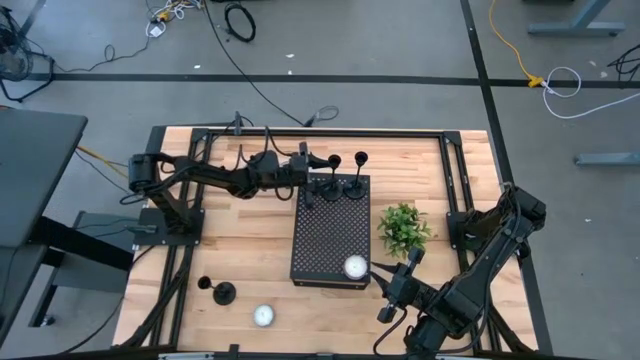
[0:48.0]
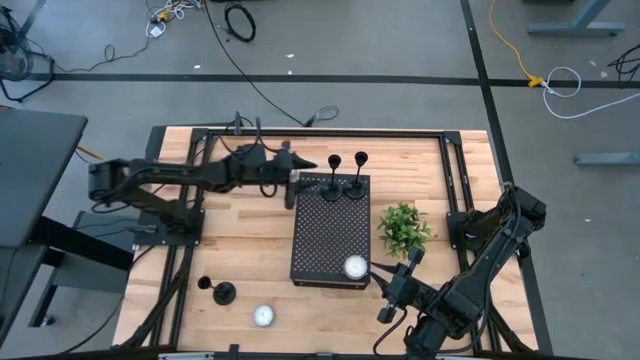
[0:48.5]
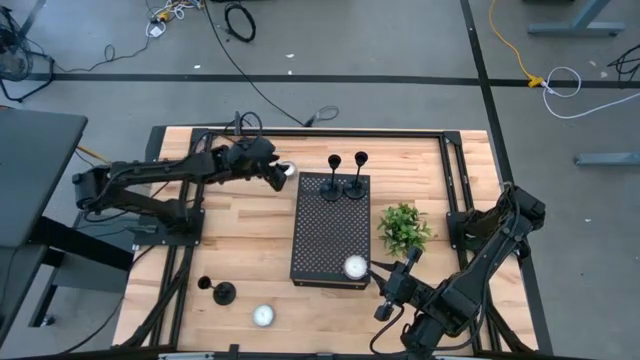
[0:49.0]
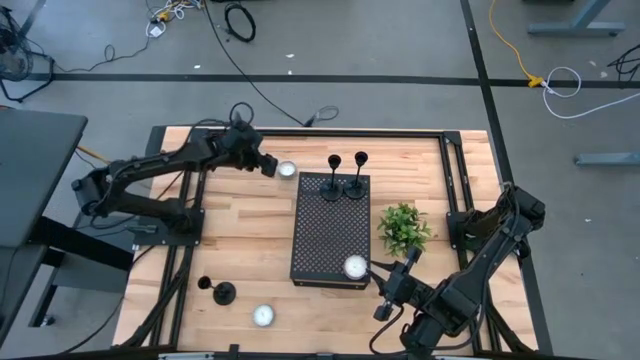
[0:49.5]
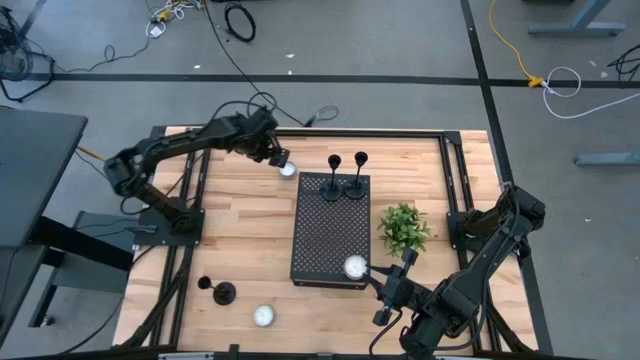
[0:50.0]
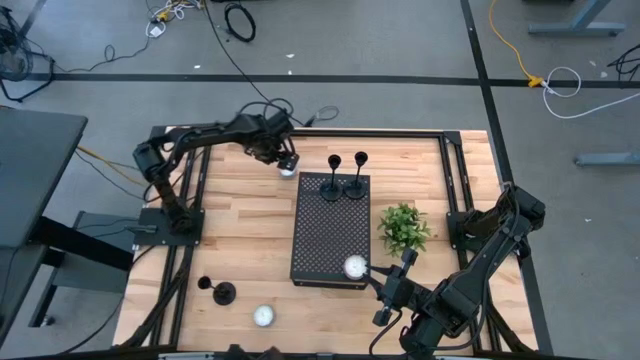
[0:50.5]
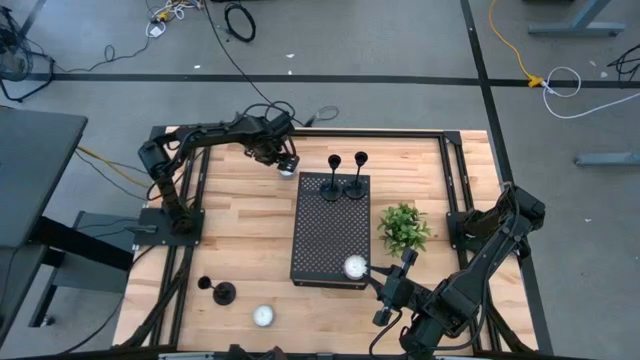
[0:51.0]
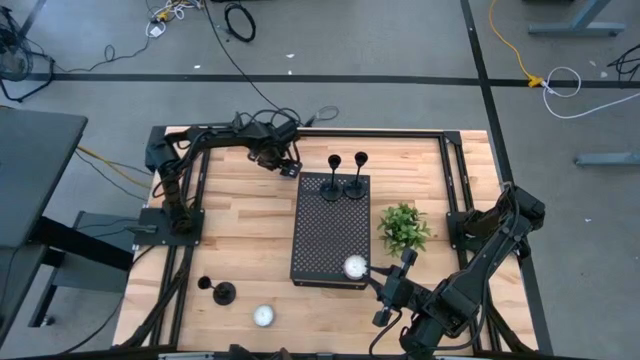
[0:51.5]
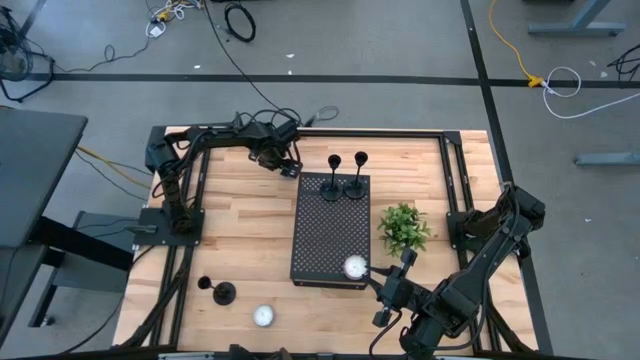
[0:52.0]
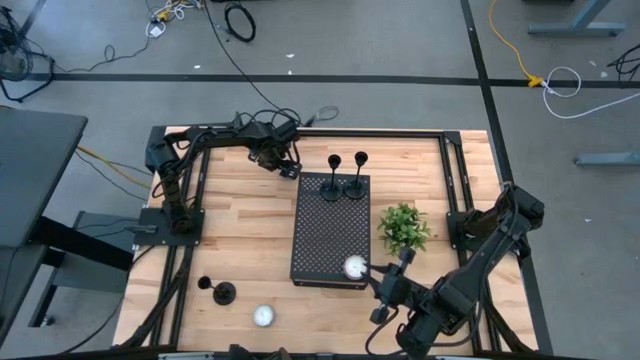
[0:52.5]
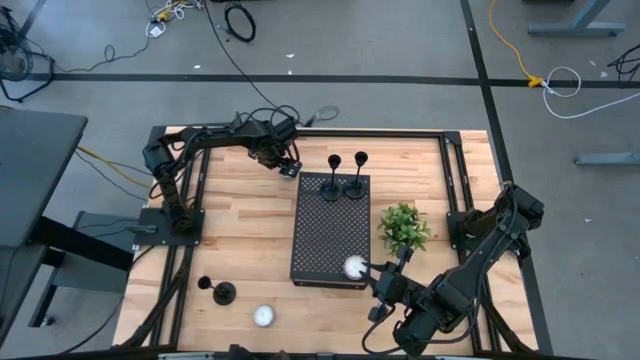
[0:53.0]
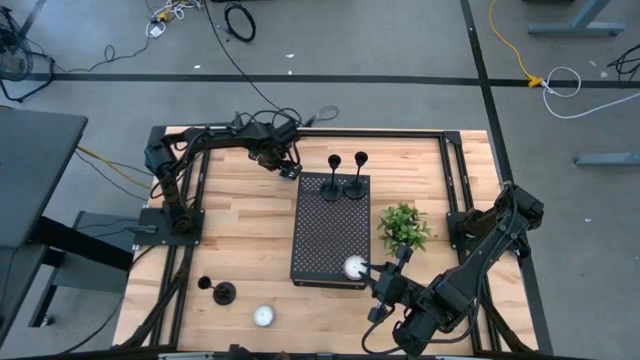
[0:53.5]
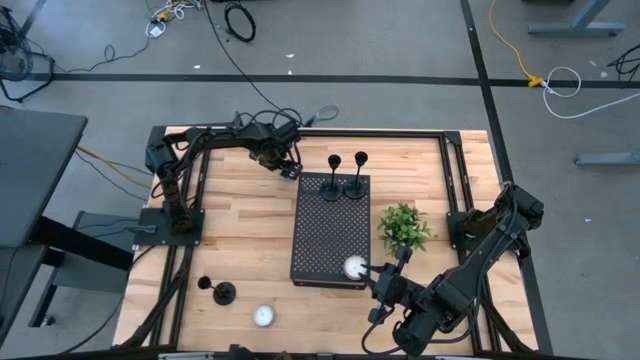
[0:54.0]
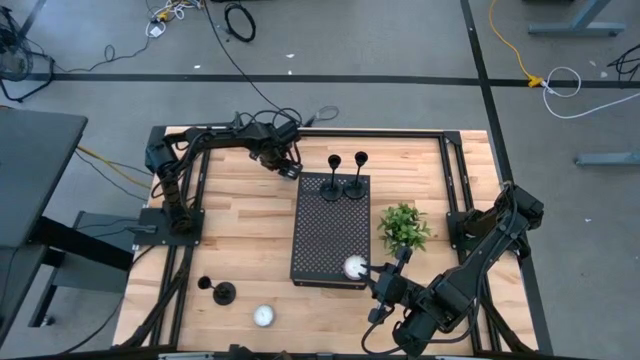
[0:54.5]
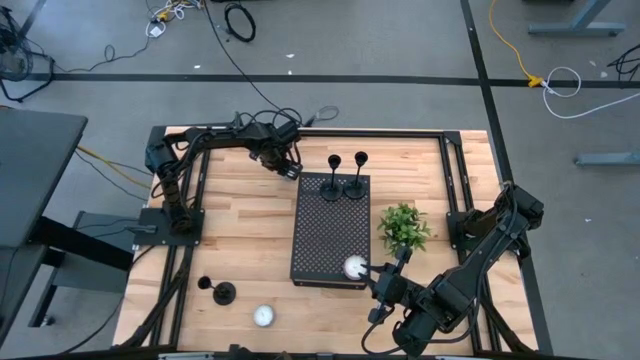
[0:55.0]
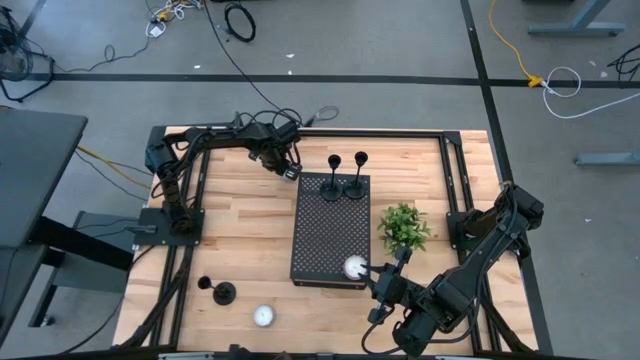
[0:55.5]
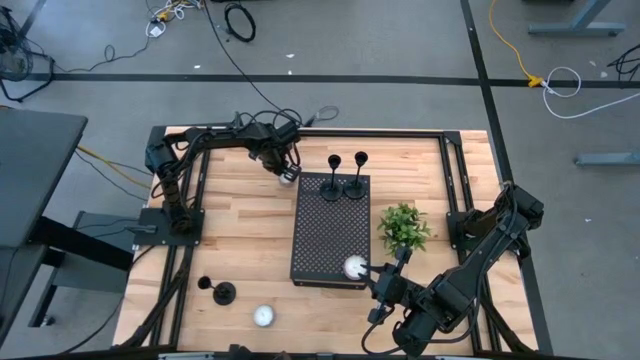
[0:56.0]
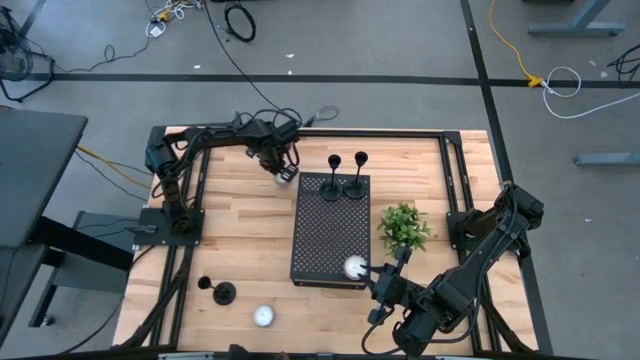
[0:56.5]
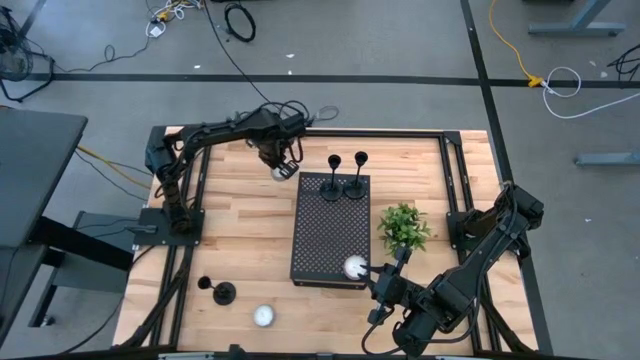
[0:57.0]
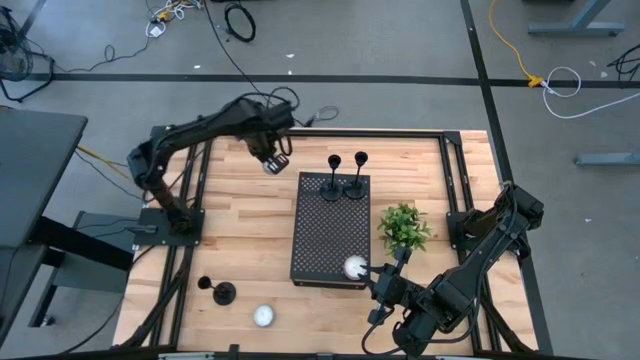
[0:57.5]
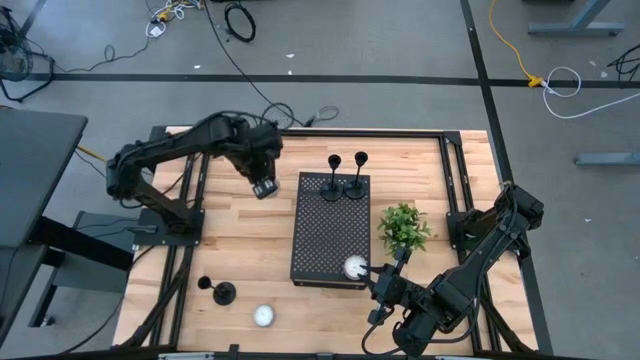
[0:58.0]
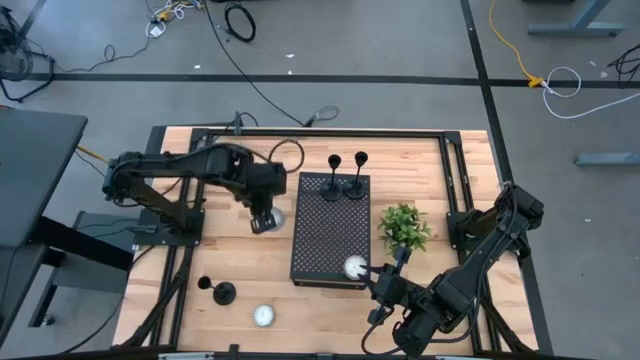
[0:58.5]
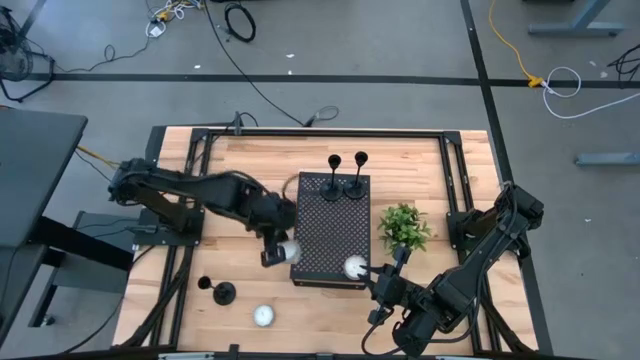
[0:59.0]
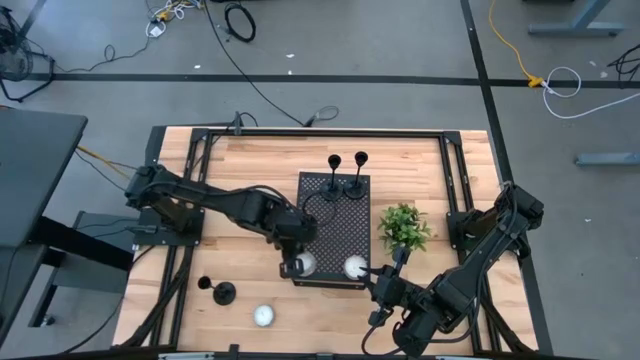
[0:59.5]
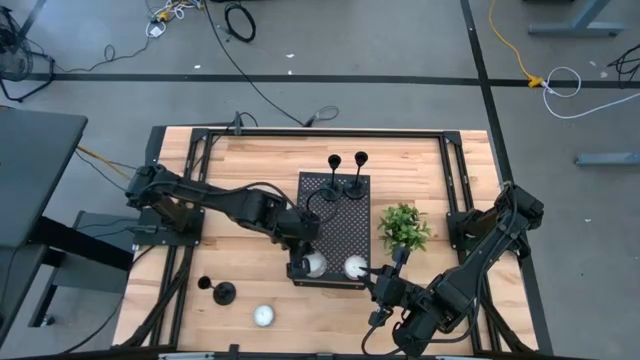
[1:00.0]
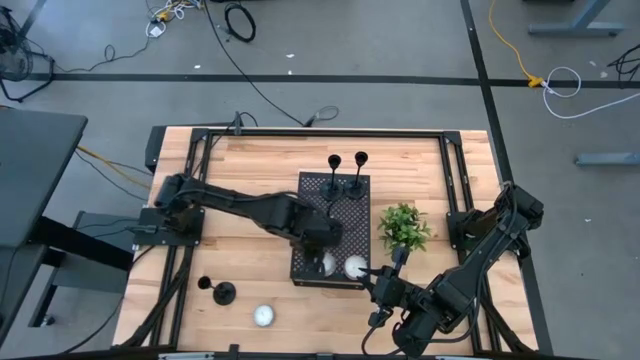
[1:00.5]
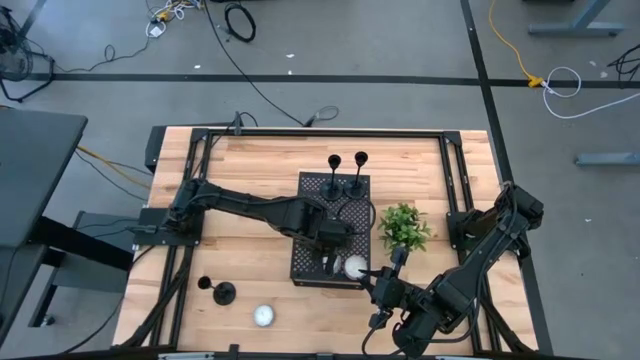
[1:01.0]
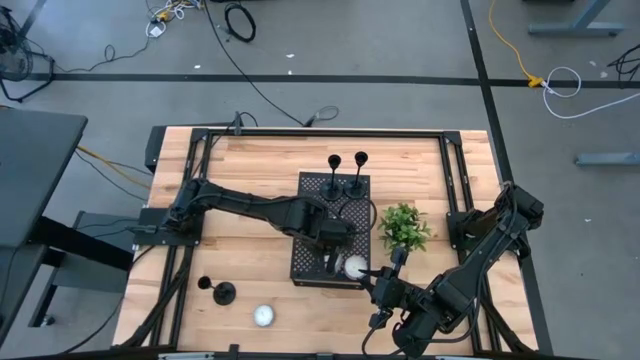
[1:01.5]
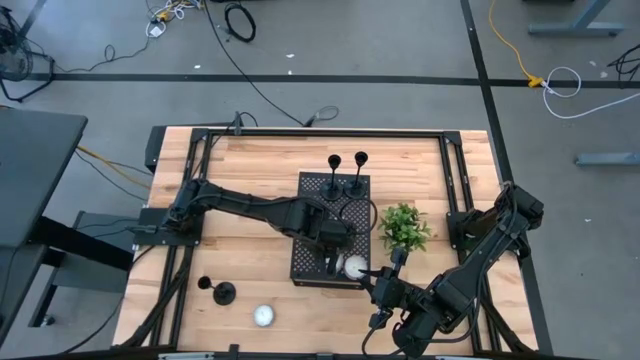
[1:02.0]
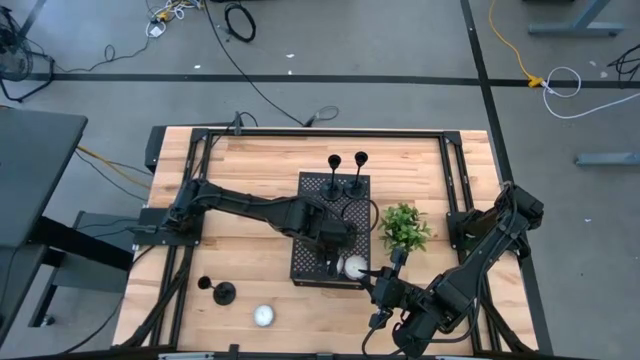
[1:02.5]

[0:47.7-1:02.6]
Task: Pick & Place candle stick holders
Put the top white candle on the shelf aligned with the other white candle

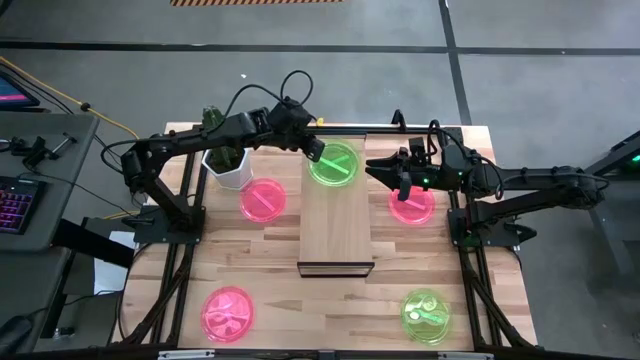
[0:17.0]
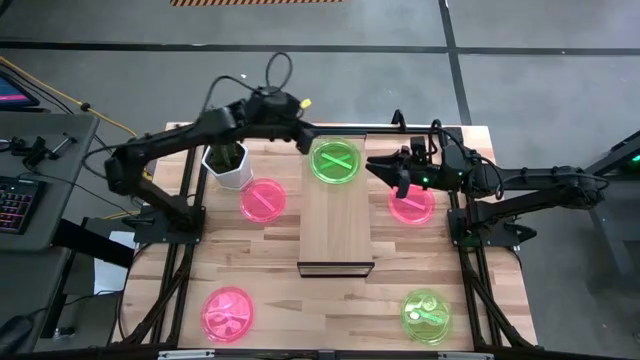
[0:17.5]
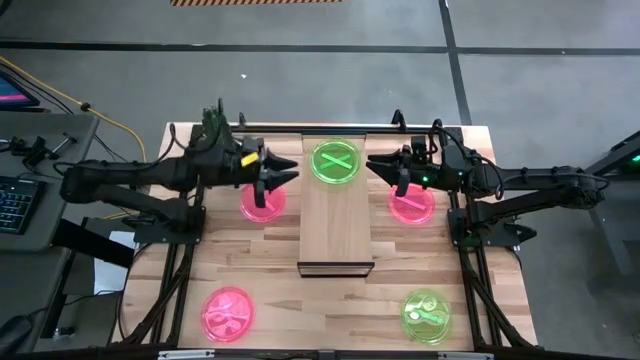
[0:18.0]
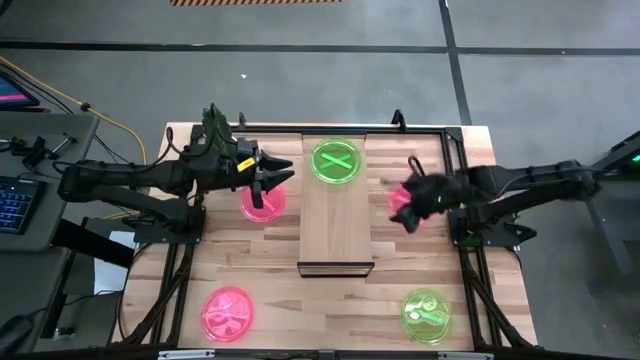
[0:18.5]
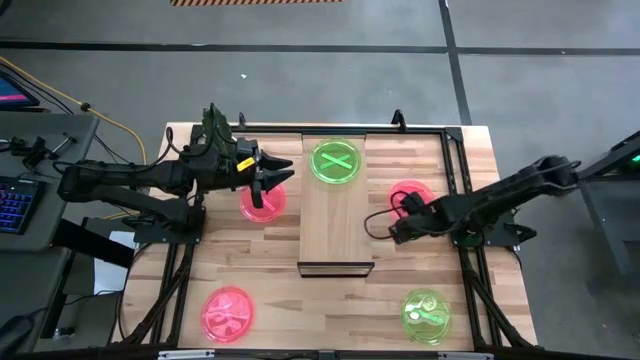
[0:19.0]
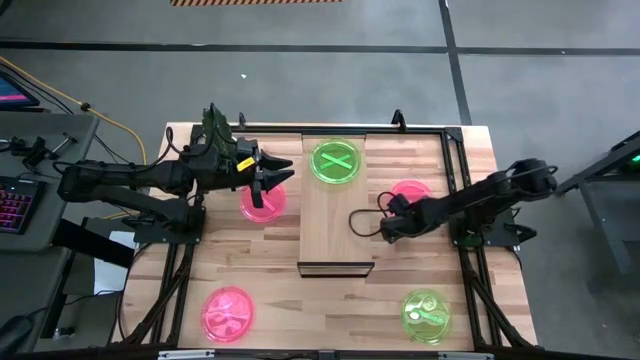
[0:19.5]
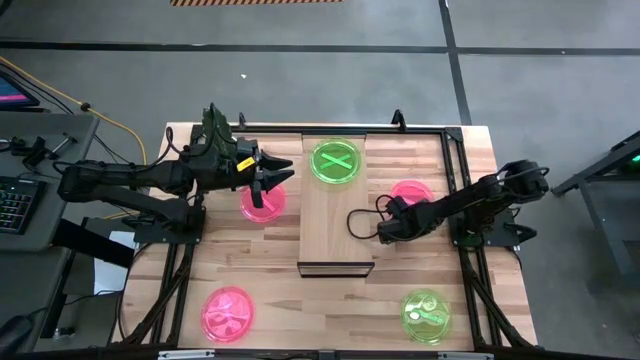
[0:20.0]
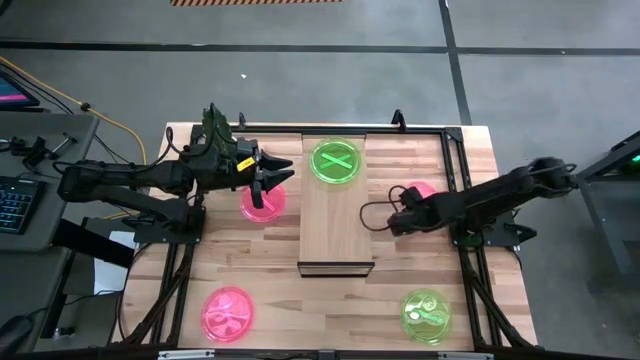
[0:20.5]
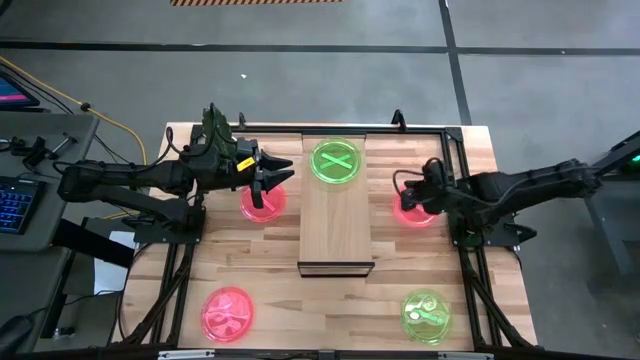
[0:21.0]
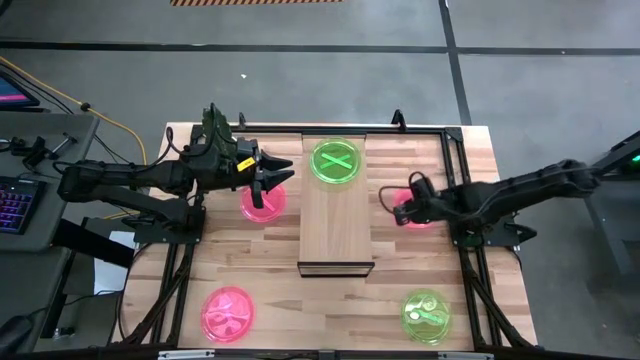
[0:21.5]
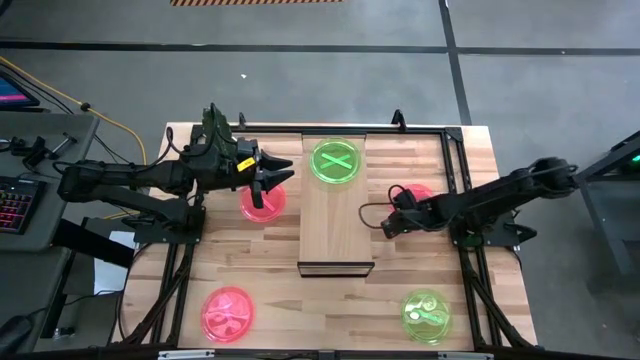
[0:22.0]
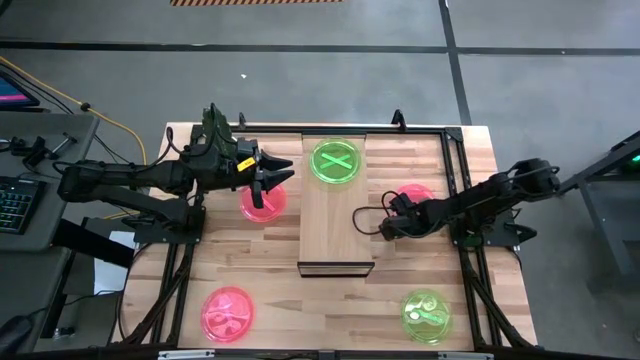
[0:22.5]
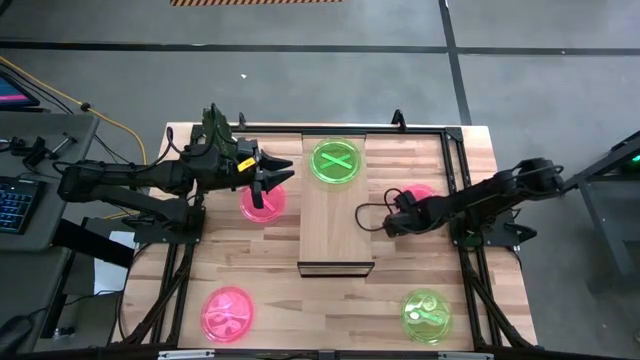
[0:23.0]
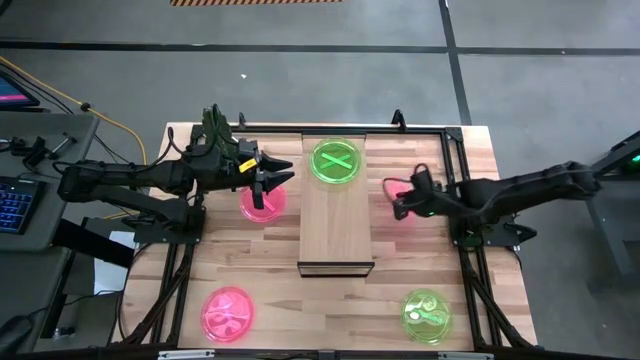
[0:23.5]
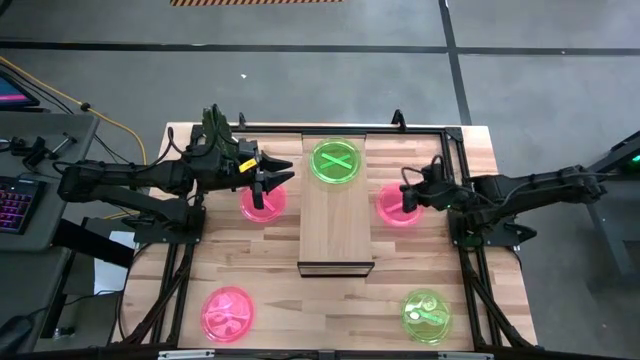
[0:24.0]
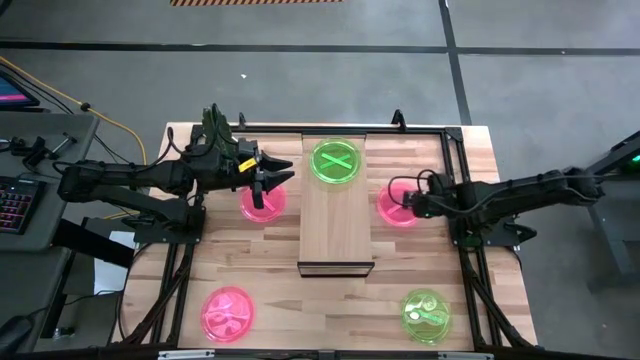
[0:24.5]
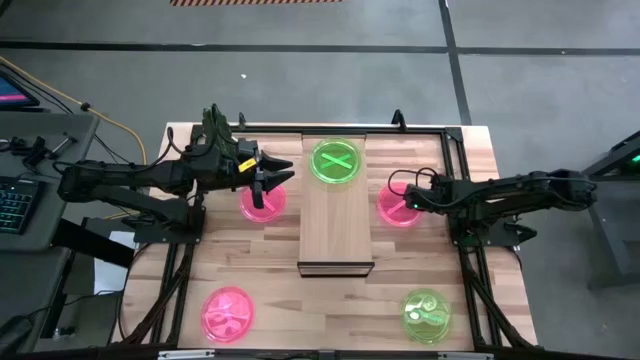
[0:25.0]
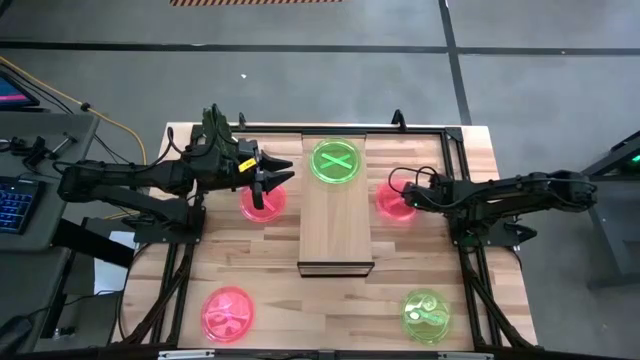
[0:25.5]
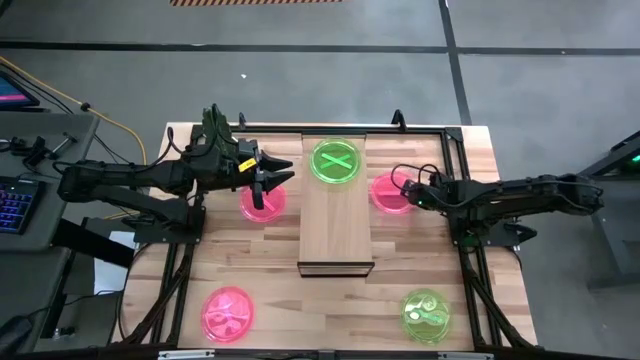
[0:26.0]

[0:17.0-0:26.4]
Task: Place and stack plates onto a shelf
Put the top right pink plate on the shelf
